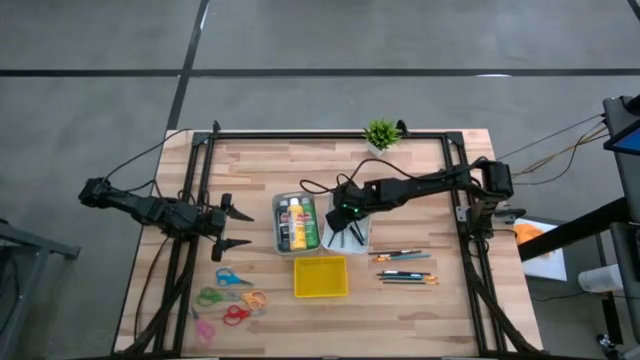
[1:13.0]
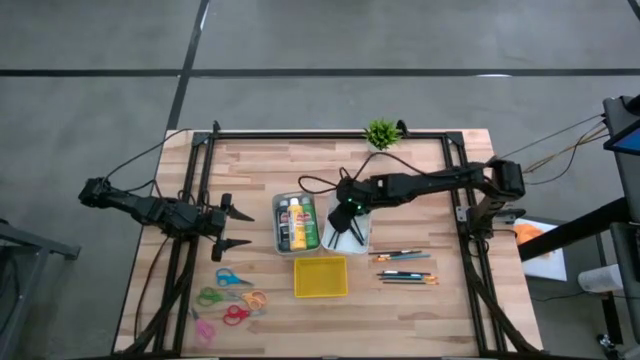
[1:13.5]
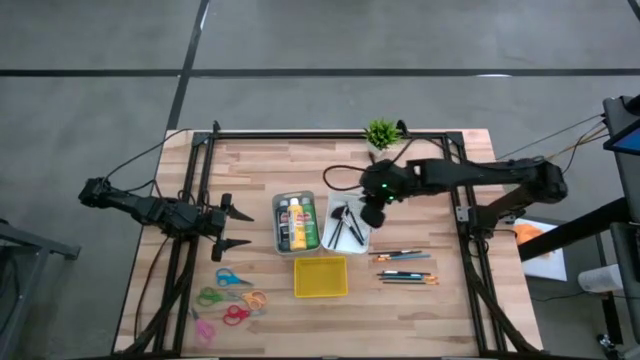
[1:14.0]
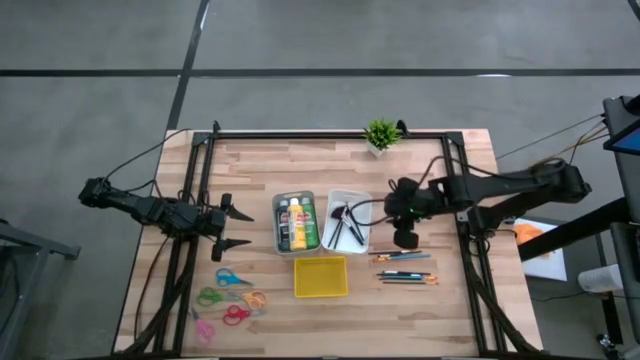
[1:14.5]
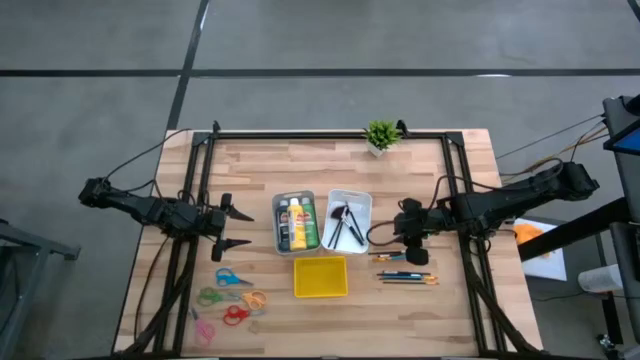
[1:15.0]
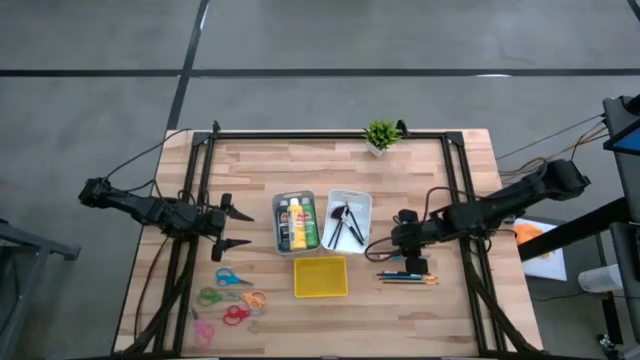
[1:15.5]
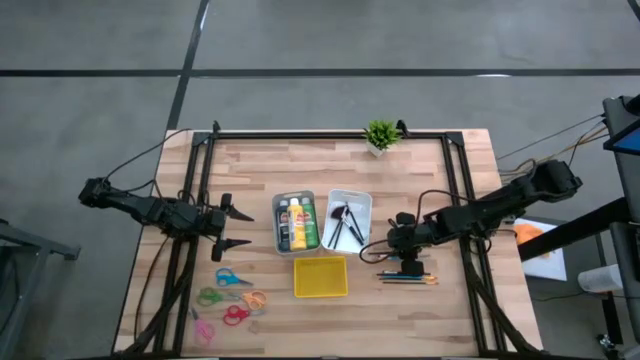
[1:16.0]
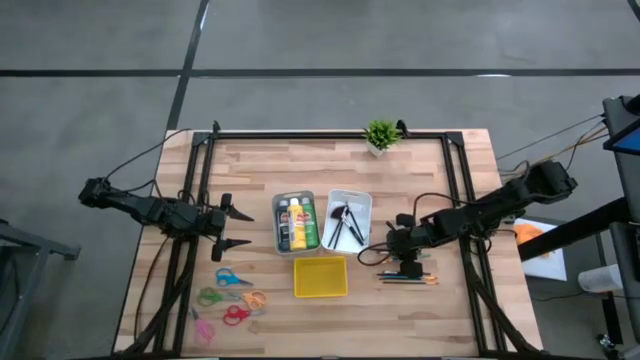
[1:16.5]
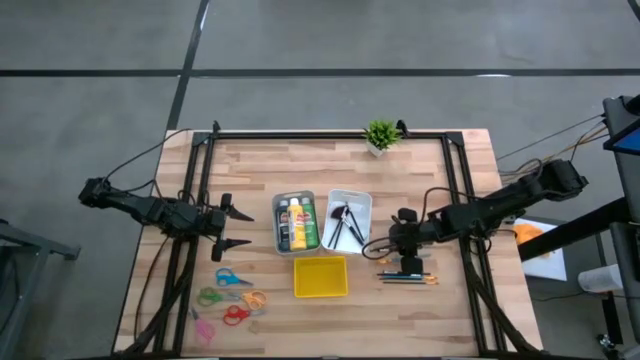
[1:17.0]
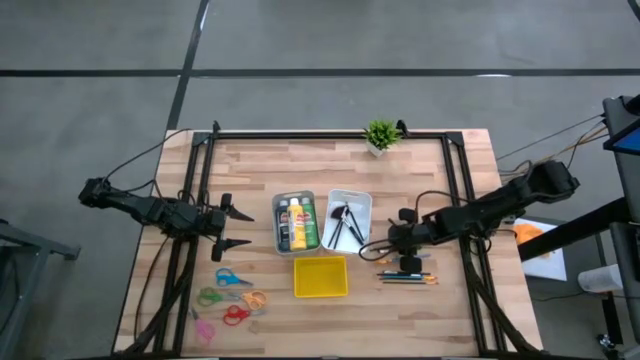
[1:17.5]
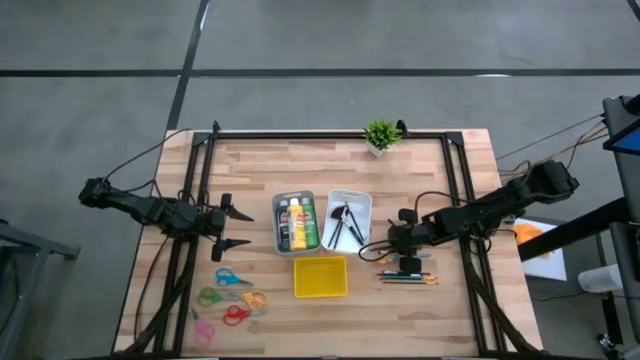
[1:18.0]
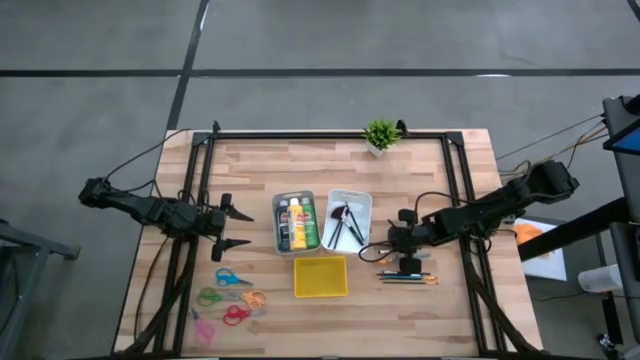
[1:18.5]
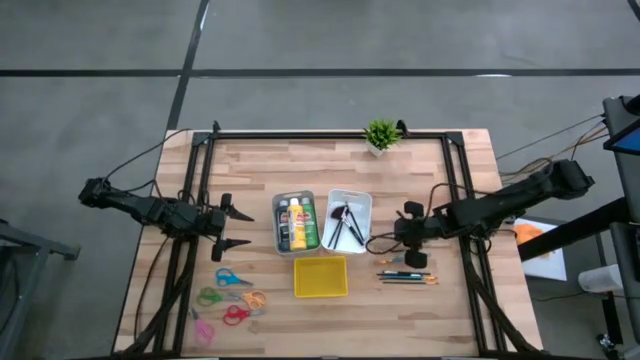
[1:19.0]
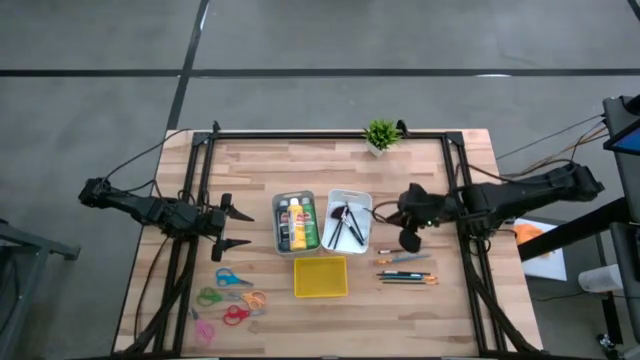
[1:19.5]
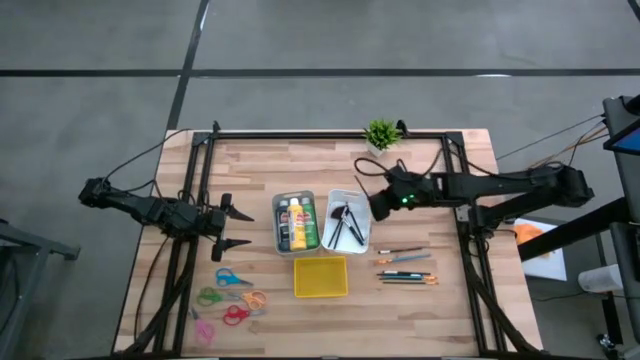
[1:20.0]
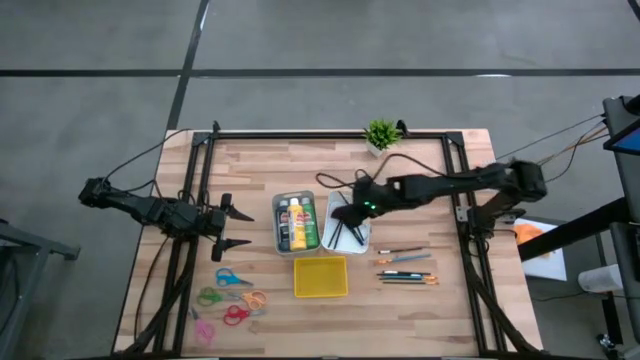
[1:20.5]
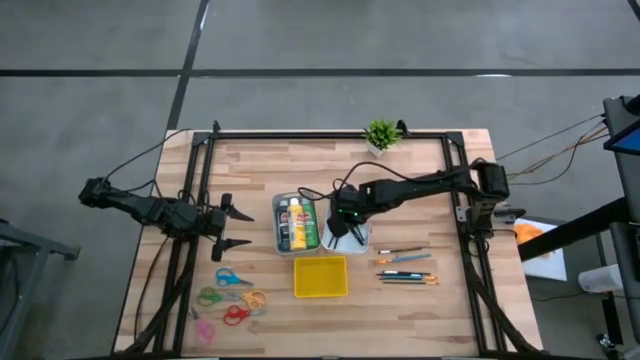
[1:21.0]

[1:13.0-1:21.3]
Task: Pick & Place Paint Supplies
Put the silver paint brush into the white bin

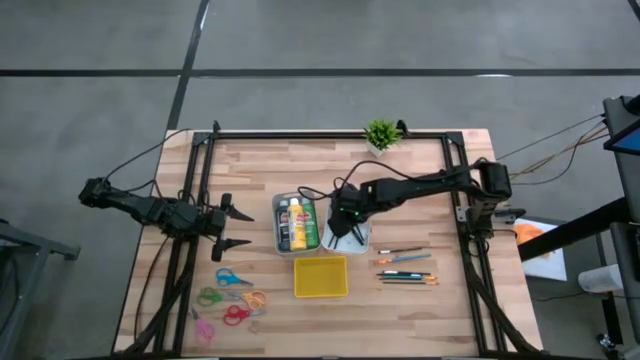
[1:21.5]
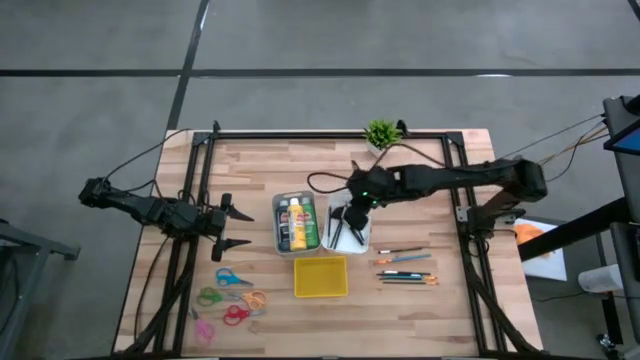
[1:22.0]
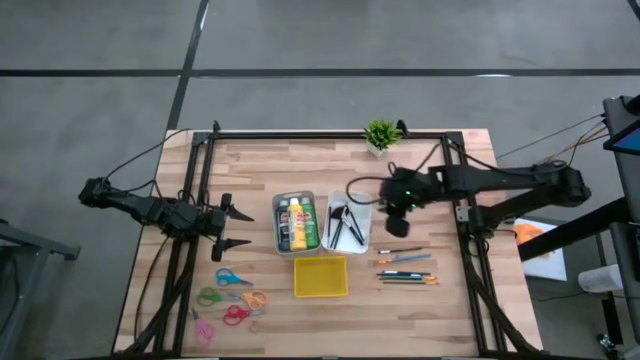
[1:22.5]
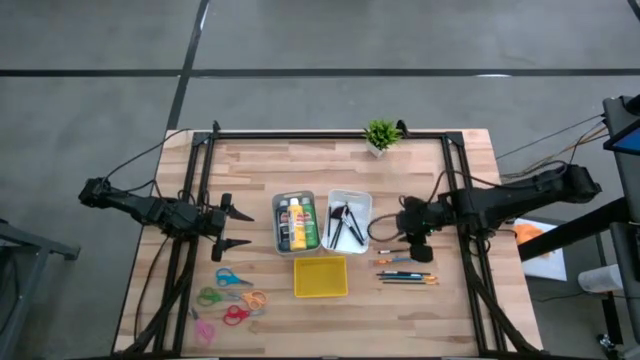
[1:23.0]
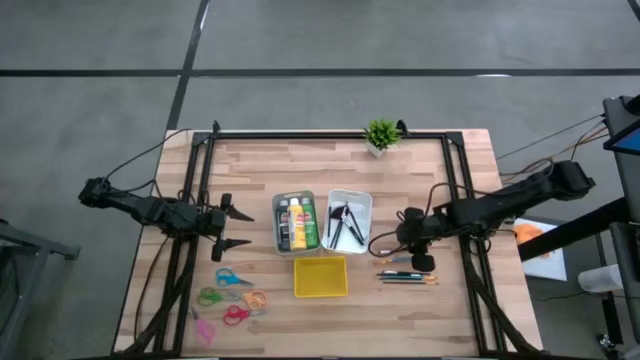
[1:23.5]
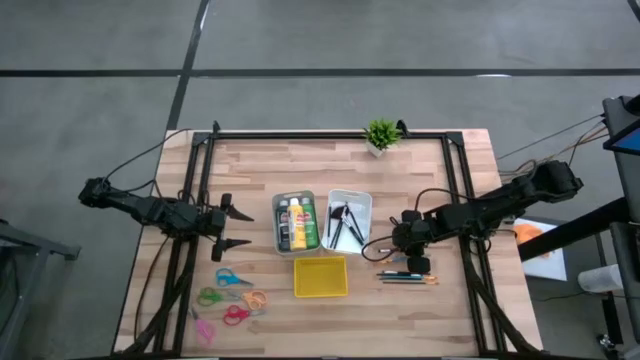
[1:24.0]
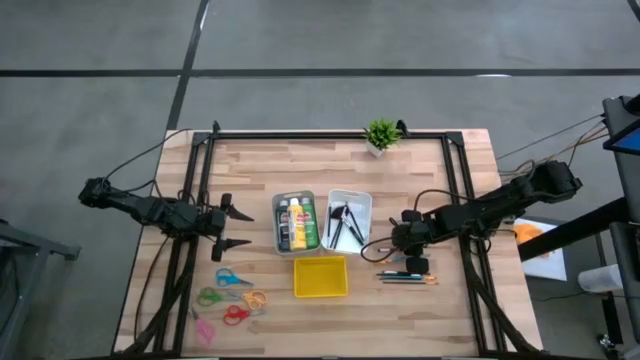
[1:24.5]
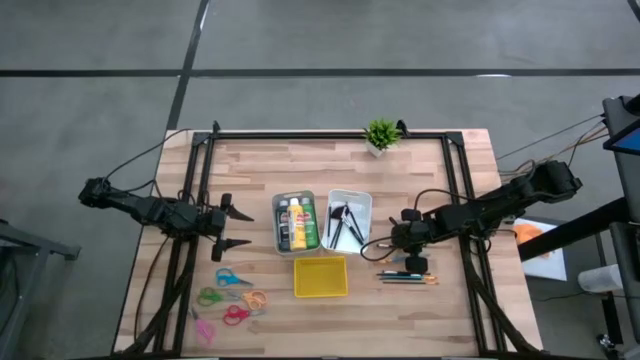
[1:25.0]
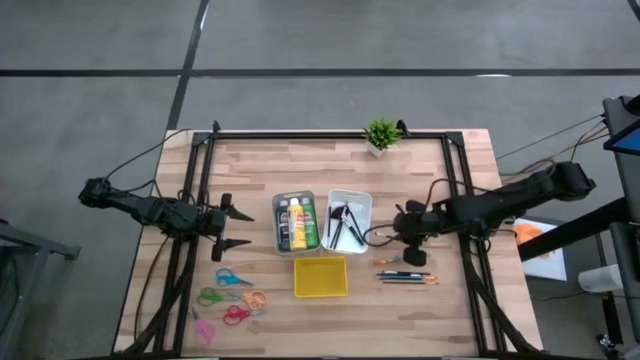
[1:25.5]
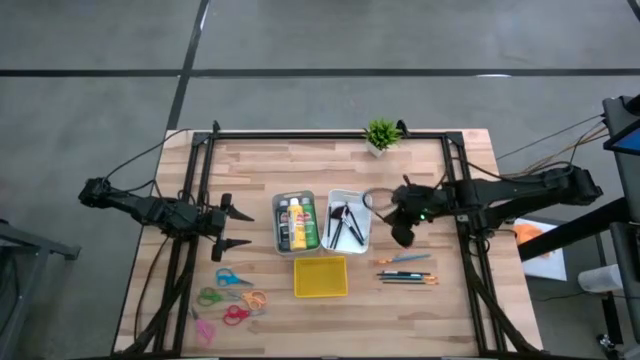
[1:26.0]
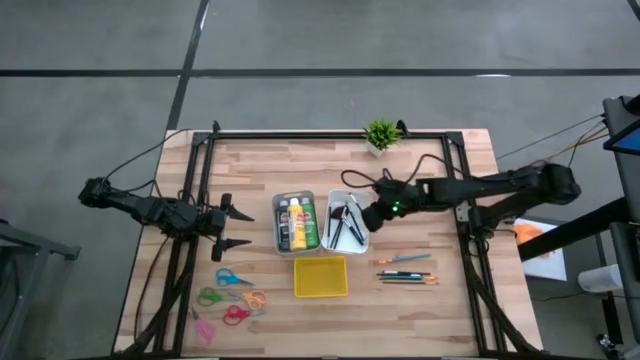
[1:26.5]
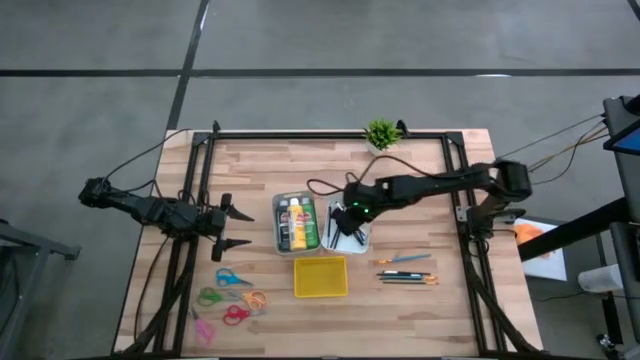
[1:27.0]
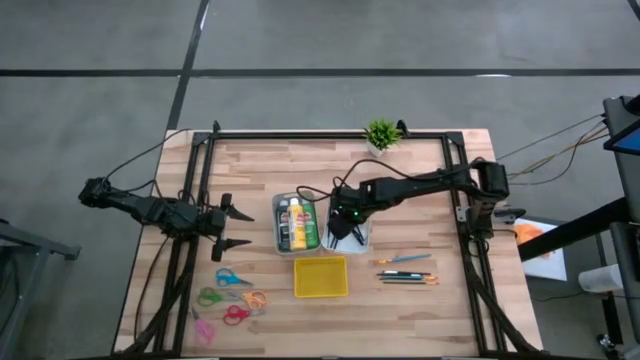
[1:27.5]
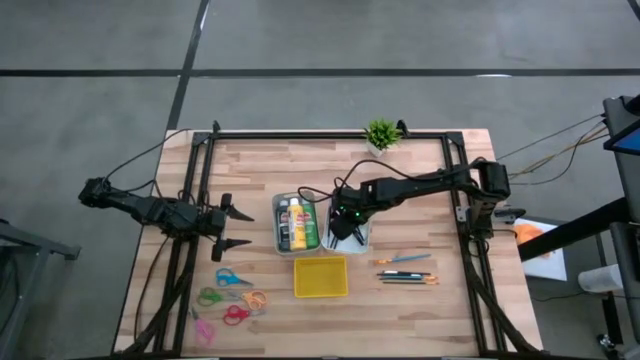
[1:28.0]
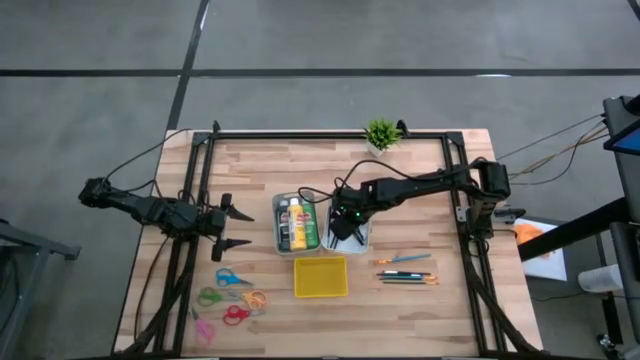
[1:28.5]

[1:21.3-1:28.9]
Put the silver paint brush into the white bin

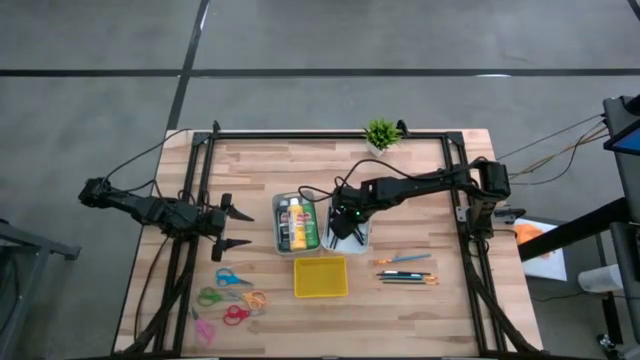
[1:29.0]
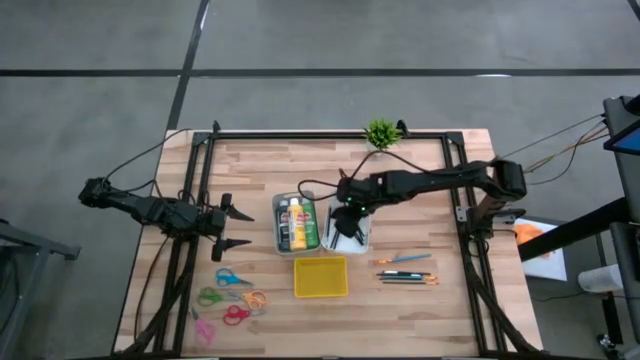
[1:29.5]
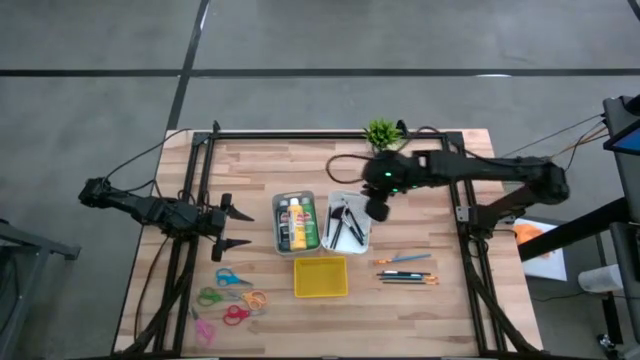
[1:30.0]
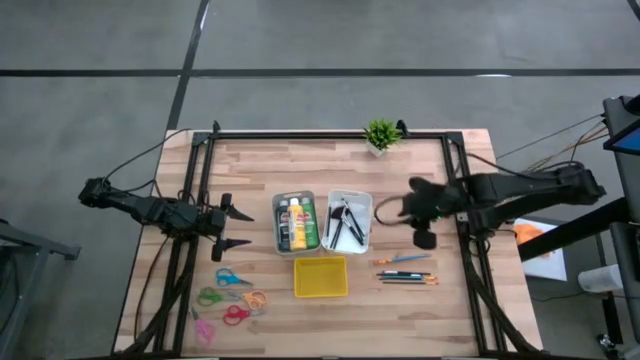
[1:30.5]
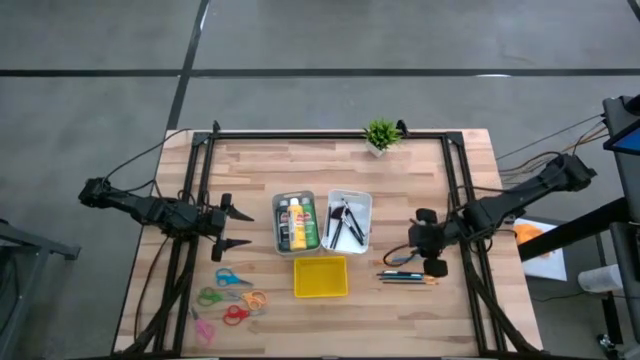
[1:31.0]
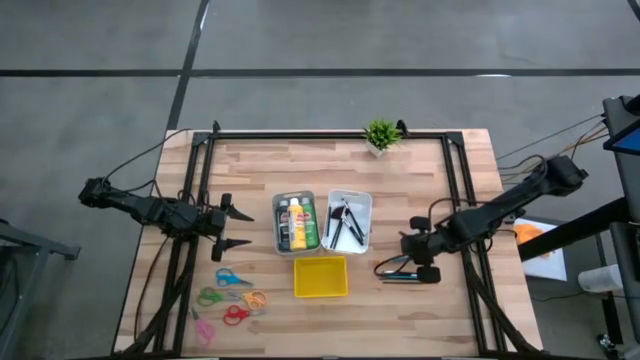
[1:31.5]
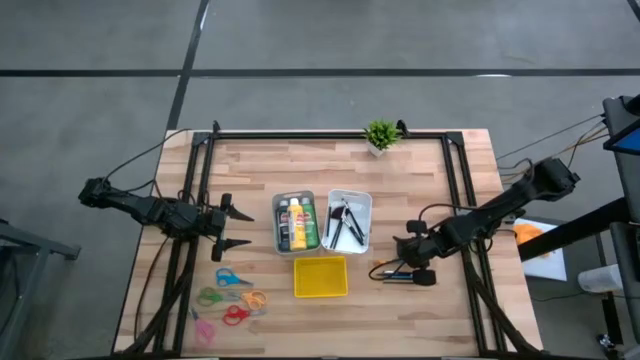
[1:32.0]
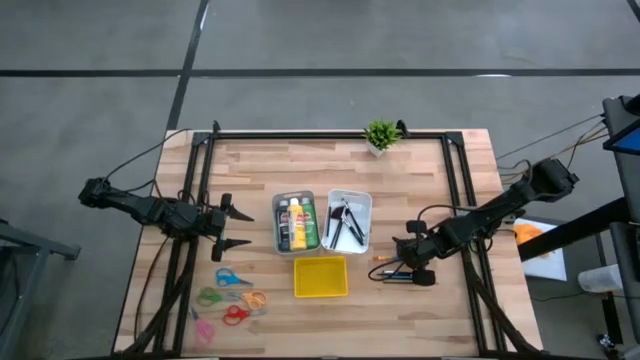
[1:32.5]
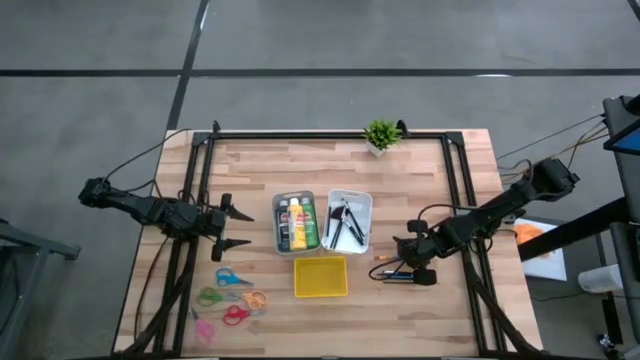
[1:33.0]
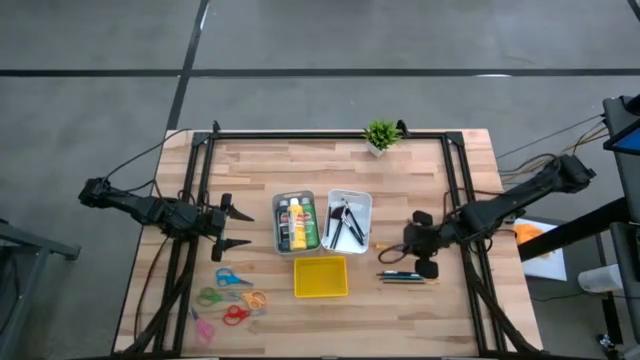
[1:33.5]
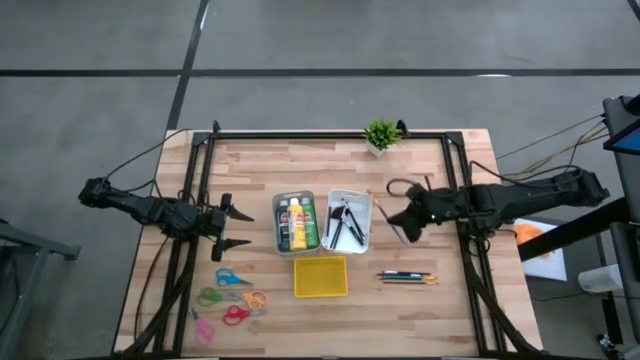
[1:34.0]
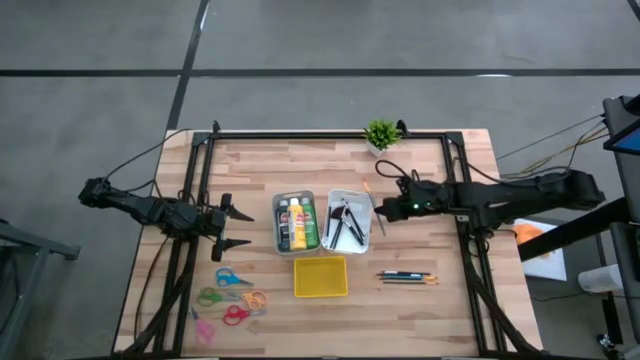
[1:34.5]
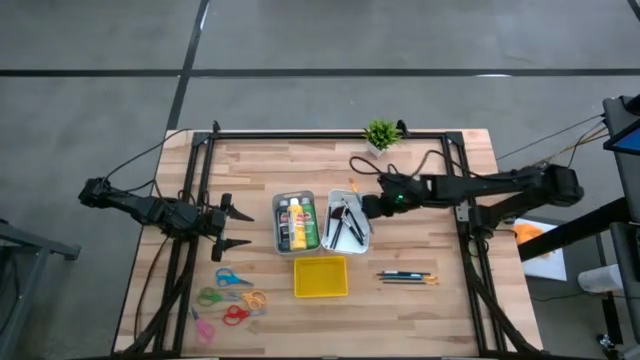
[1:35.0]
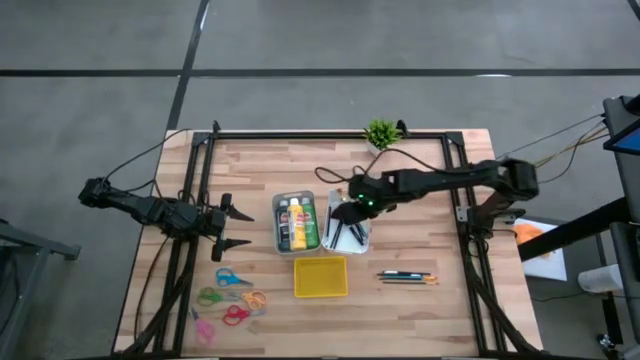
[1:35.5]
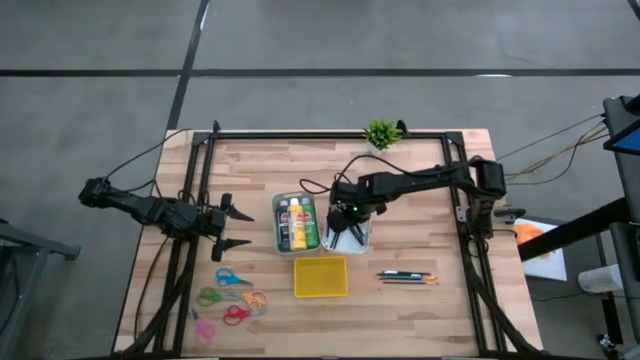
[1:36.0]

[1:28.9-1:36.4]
Put the gold paint brush into the white bin
